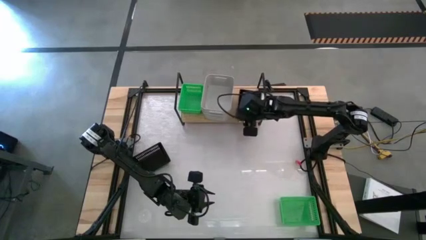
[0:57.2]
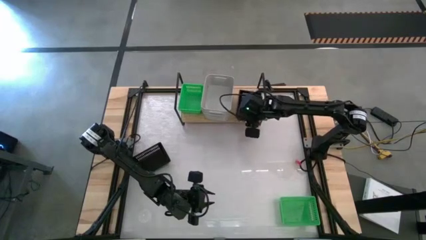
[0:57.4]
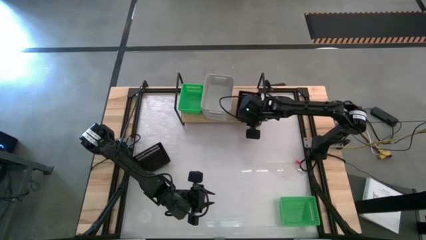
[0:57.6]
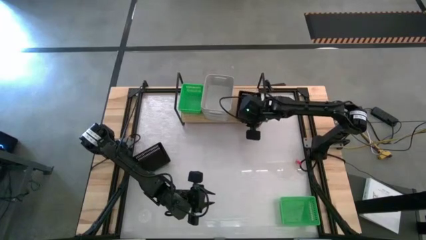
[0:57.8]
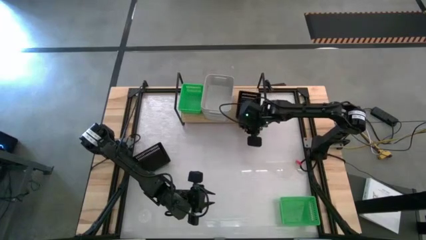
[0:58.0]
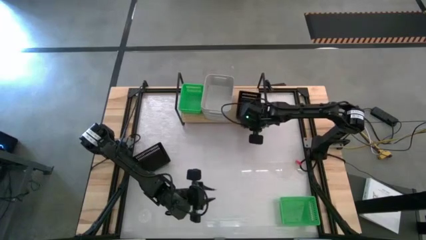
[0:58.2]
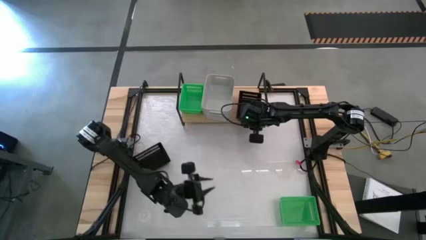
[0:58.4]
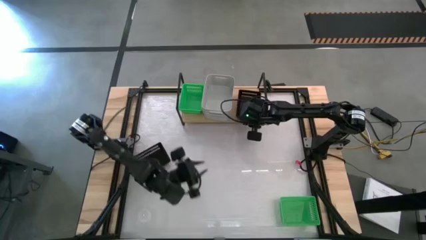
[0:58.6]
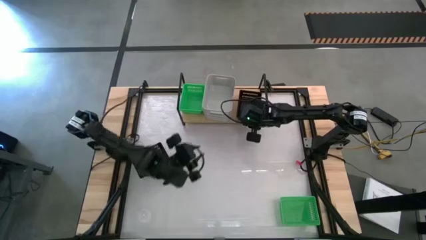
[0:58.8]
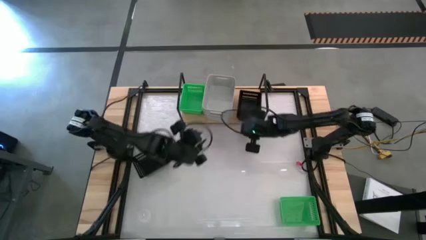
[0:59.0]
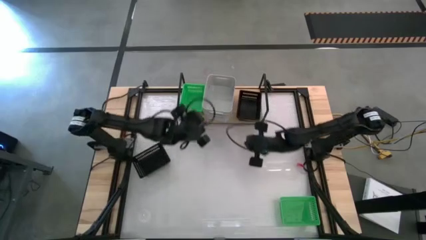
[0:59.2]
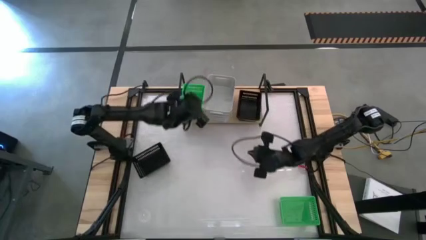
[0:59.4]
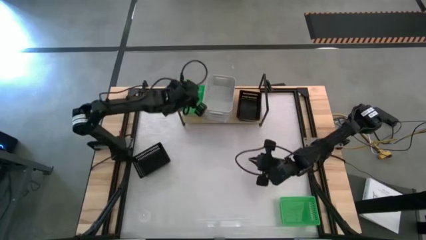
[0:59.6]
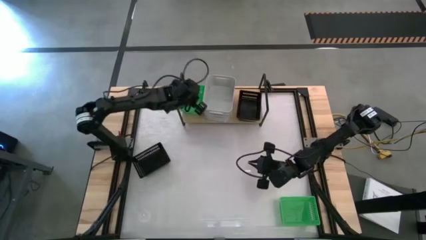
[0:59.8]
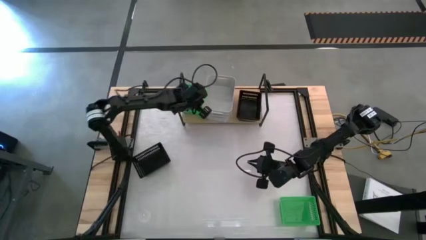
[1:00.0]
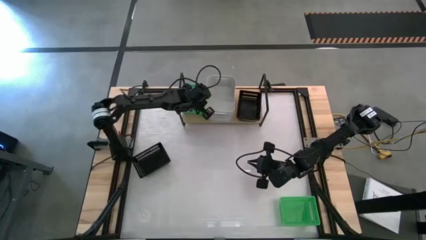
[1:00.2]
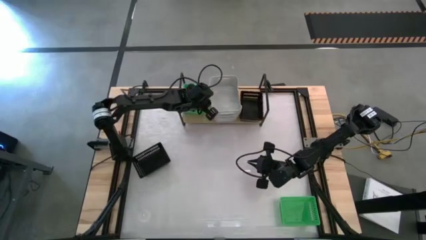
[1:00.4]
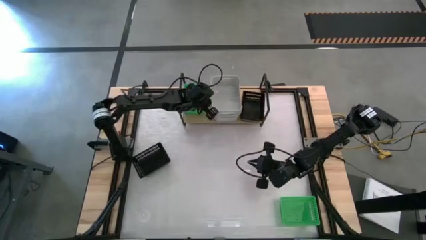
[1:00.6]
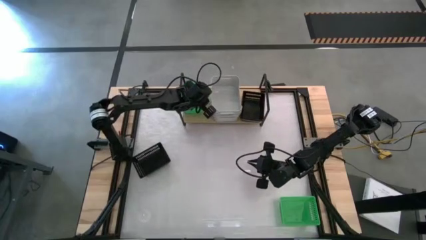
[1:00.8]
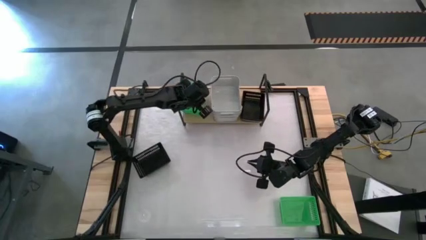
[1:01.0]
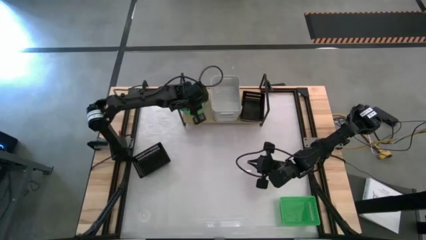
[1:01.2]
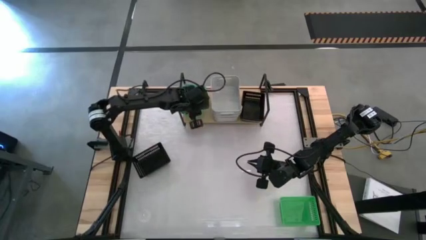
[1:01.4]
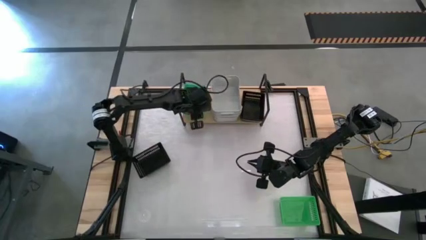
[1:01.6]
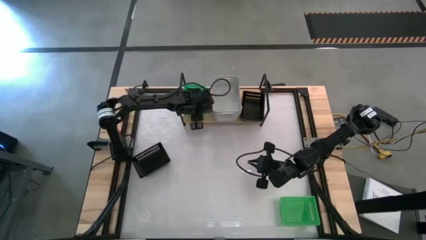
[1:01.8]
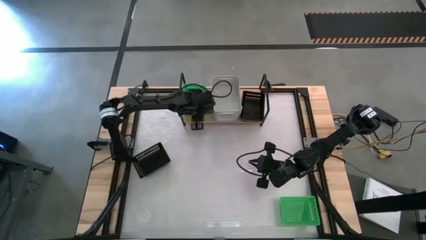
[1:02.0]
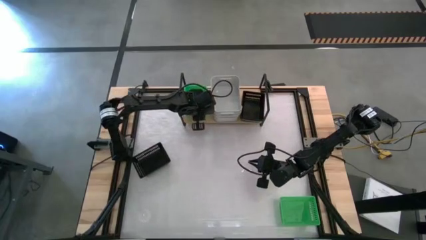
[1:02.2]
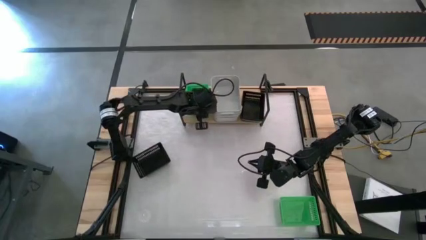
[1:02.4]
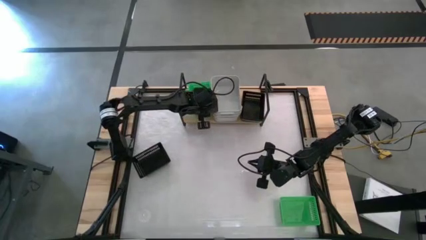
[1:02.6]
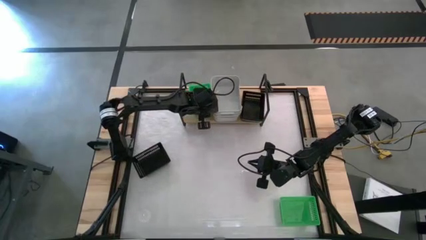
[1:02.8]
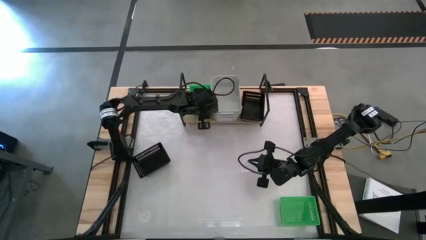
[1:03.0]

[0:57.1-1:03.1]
Task: Stack baskets on shelf by color
Adjust the stacked bins on the shelf

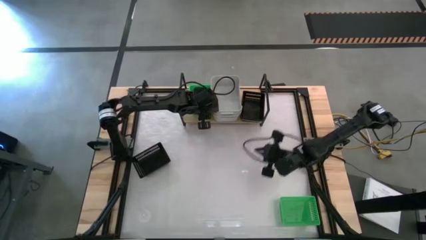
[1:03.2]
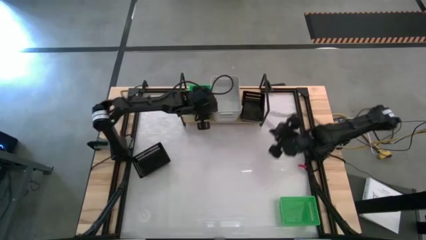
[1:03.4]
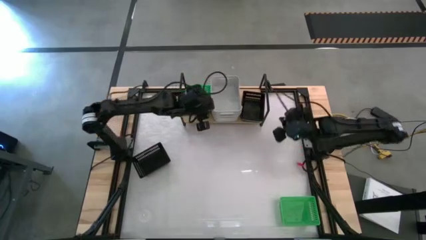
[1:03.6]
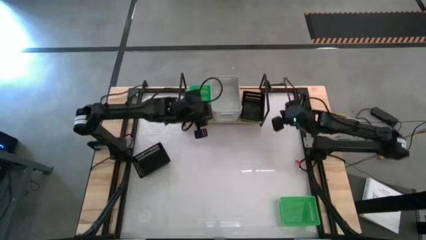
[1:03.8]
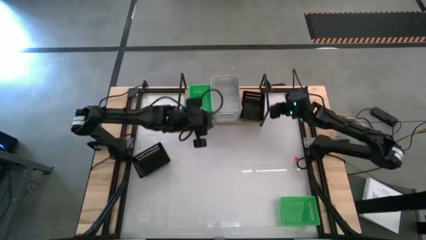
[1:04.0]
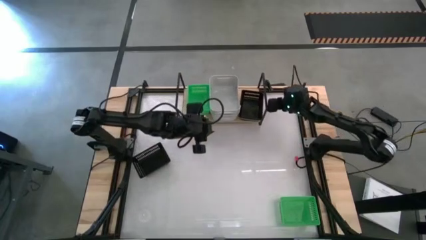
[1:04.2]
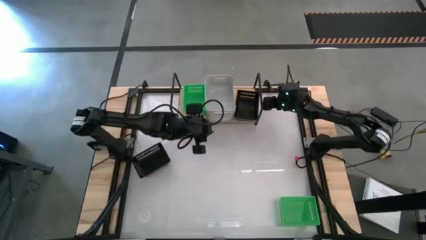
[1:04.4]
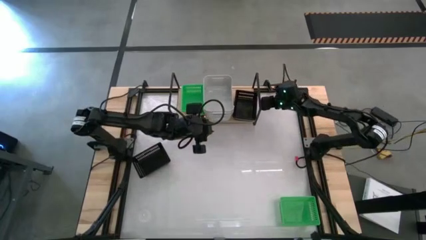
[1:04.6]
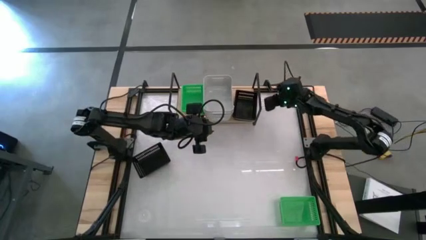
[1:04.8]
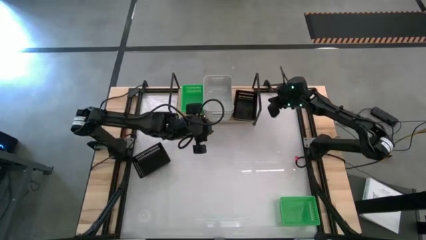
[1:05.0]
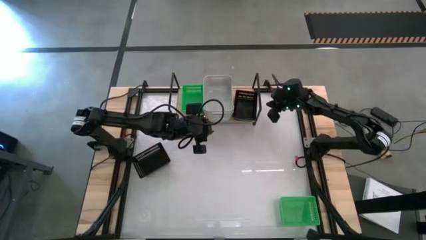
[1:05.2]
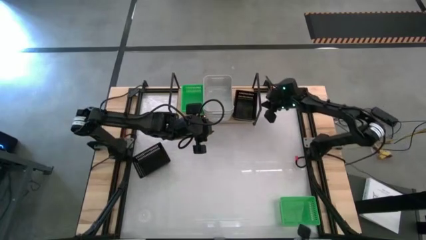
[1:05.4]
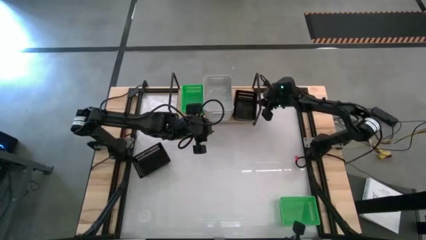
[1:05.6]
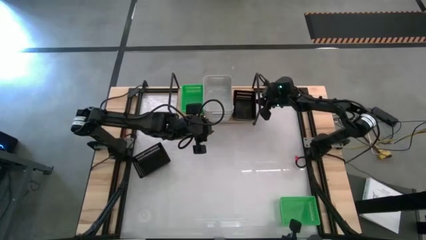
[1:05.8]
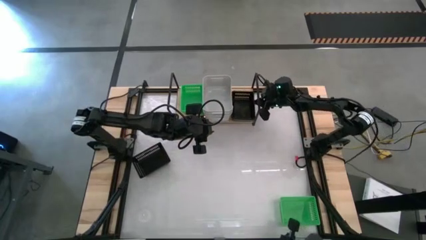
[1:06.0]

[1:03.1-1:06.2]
Adjust the shelf

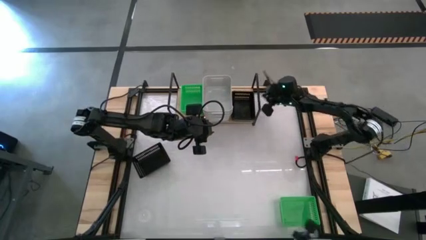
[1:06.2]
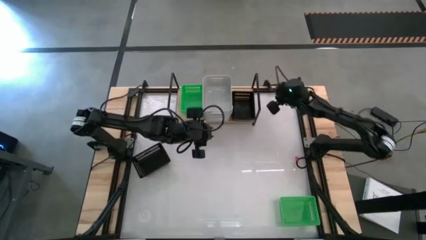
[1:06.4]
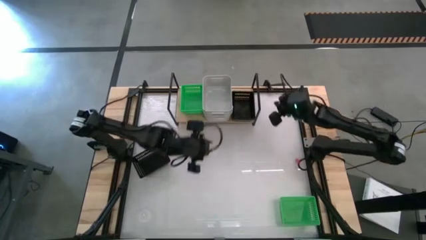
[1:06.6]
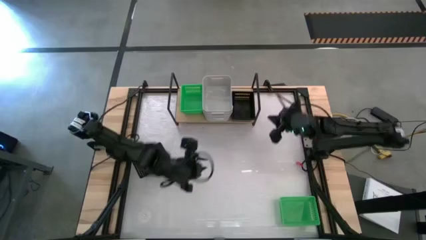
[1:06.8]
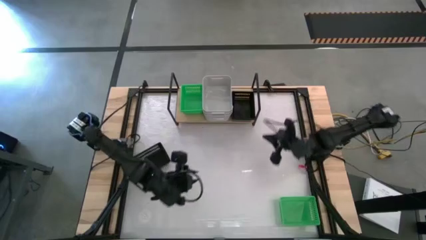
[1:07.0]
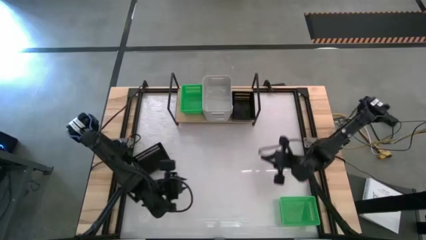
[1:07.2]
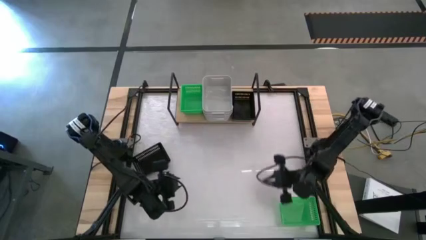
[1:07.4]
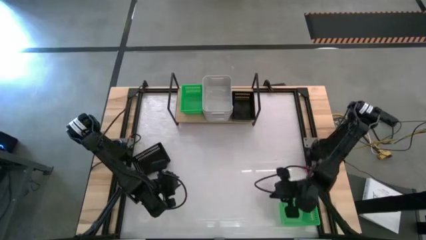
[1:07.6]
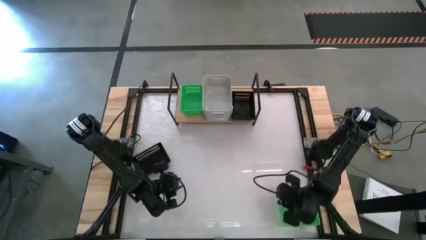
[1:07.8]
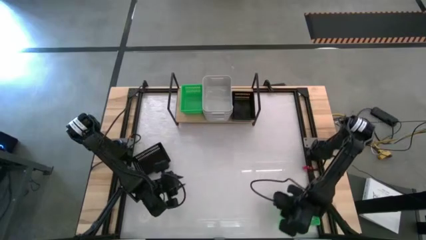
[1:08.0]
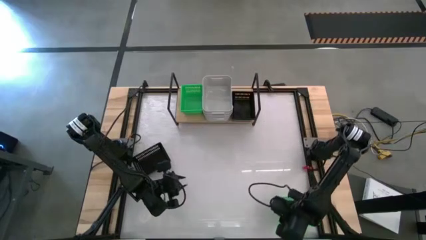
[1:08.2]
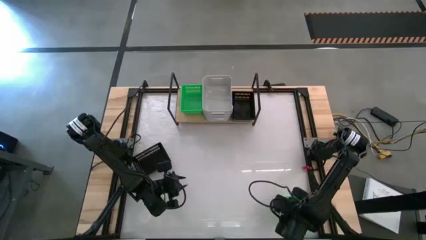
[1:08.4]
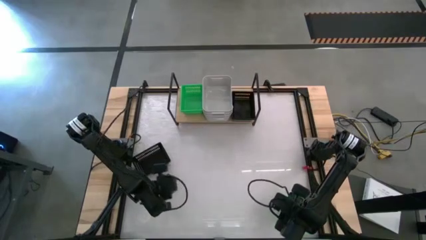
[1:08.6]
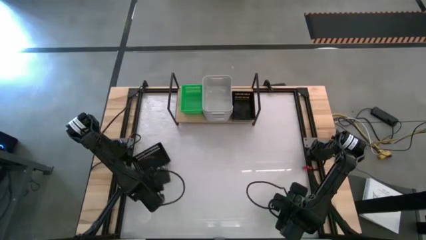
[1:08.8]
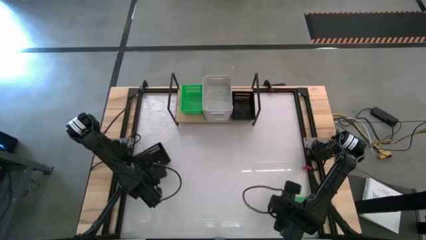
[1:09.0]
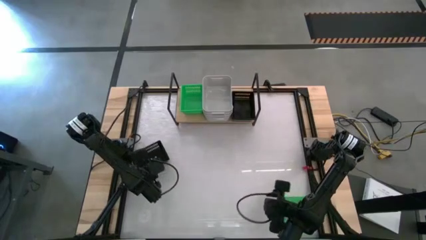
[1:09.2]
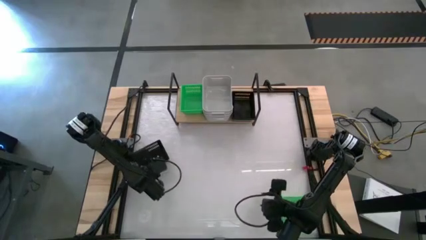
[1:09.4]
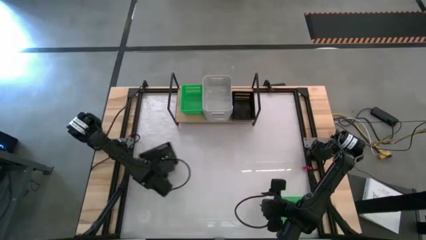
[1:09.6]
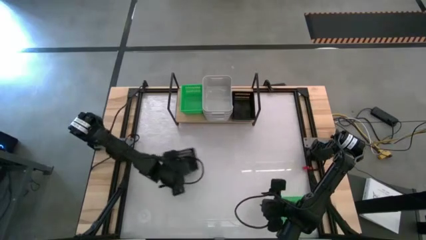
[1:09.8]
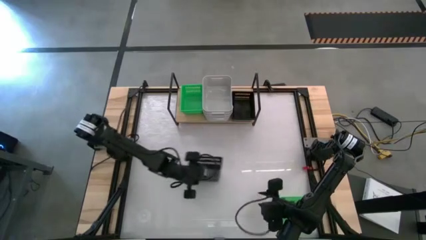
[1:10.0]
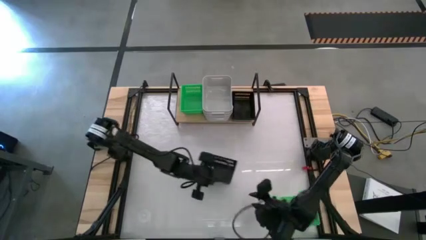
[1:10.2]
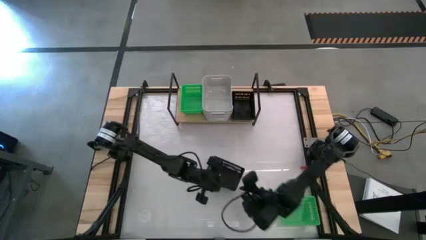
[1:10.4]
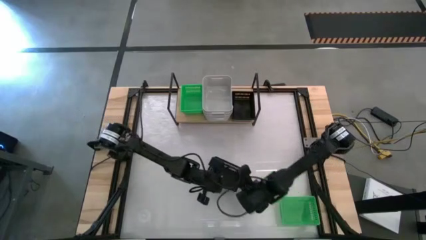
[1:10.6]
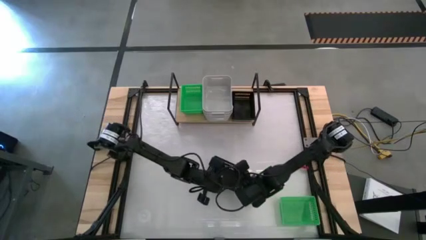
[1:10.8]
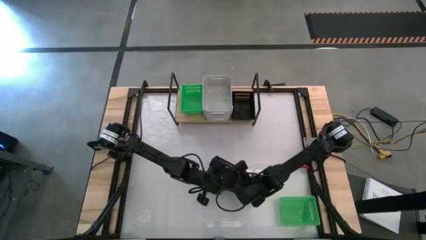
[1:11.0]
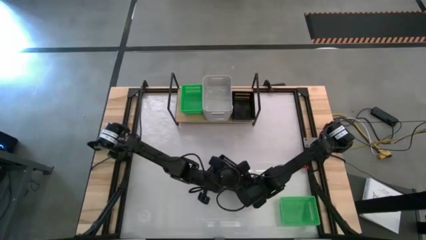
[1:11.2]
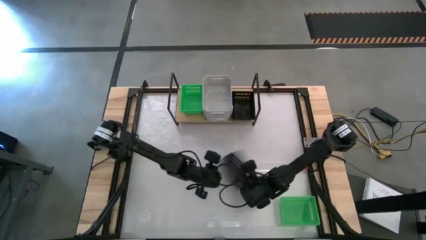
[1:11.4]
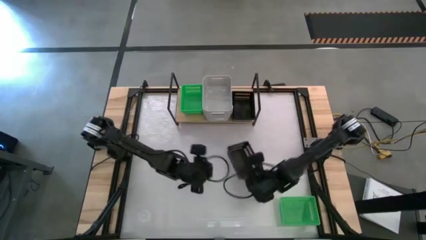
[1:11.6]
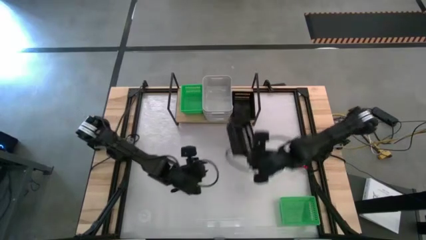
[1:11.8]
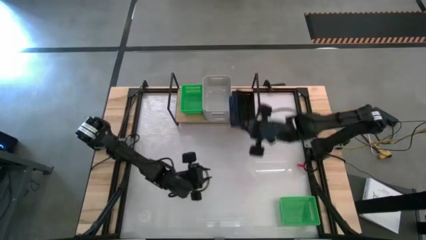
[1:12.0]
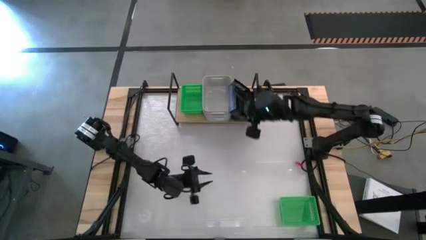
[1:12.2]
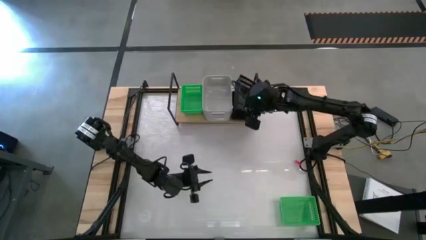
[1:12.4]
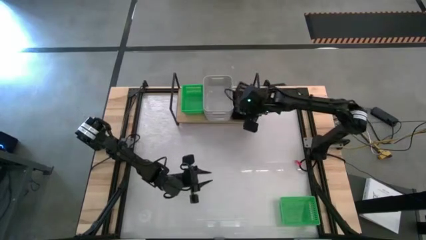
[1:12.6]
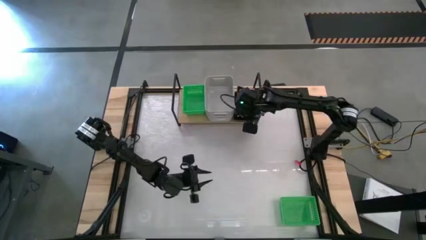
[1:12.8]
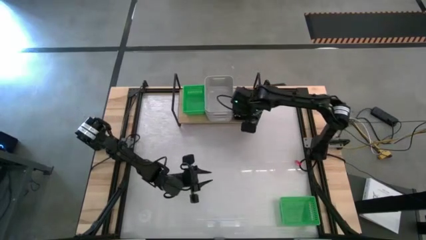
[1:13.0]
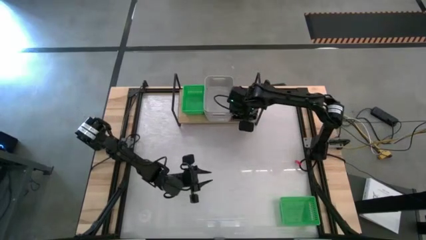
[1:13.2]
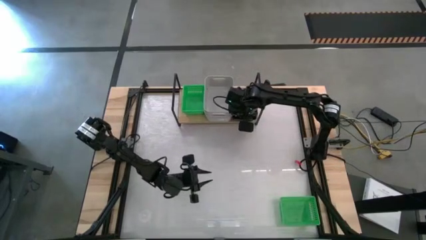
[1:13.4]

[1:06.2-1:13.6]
Stack the black bin on the stacked black bins on the shelf
